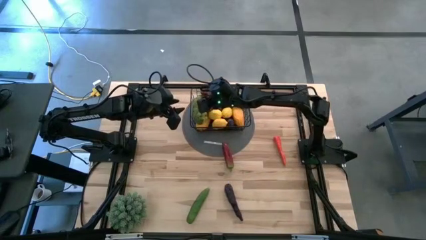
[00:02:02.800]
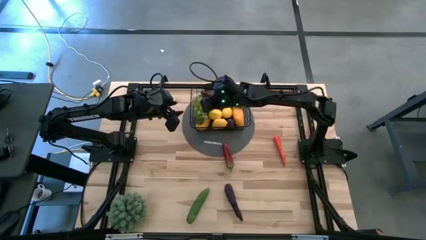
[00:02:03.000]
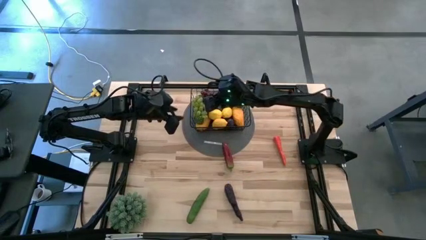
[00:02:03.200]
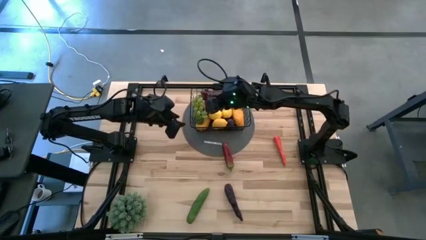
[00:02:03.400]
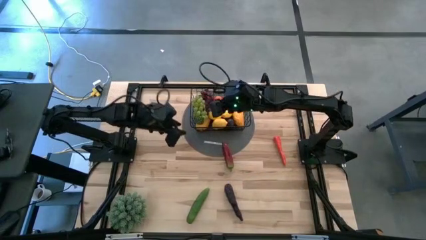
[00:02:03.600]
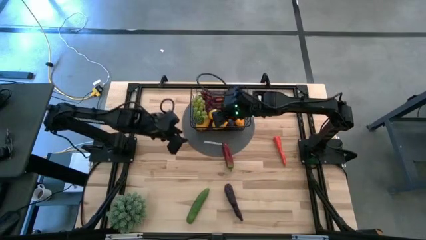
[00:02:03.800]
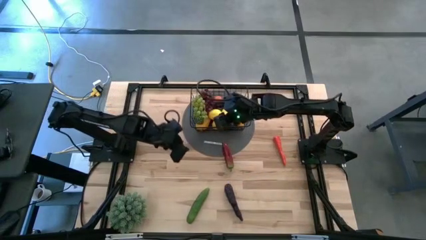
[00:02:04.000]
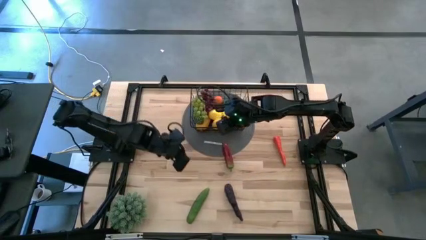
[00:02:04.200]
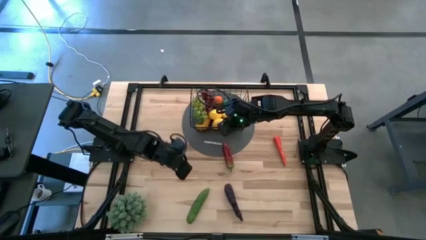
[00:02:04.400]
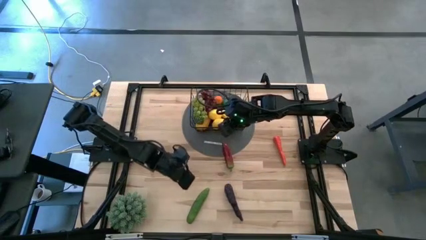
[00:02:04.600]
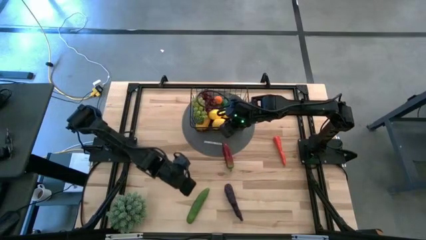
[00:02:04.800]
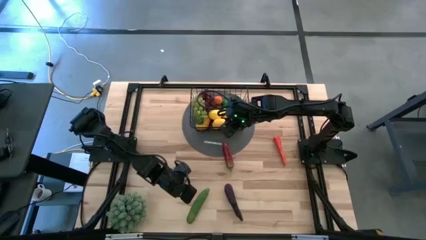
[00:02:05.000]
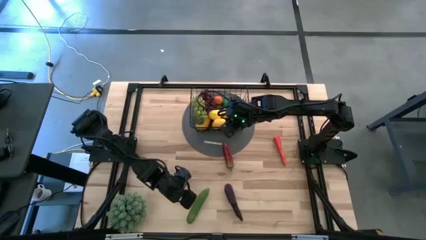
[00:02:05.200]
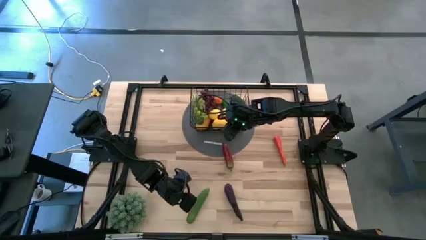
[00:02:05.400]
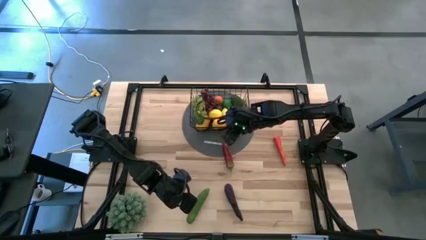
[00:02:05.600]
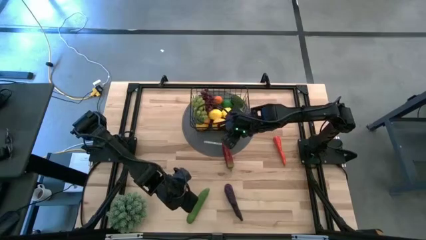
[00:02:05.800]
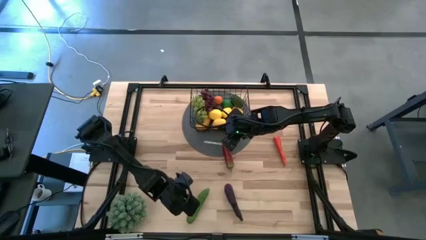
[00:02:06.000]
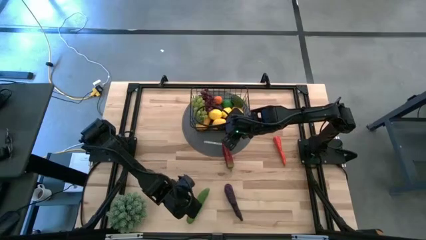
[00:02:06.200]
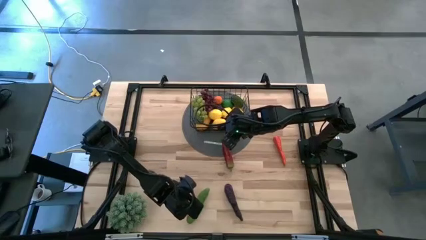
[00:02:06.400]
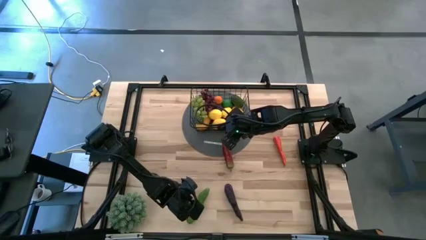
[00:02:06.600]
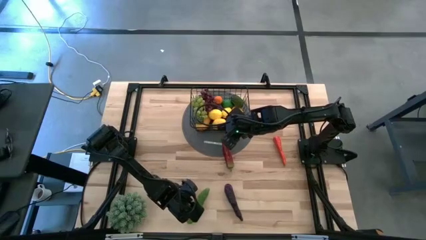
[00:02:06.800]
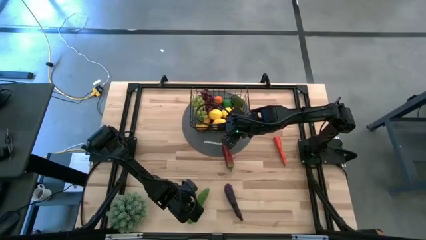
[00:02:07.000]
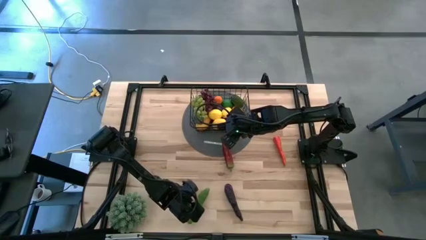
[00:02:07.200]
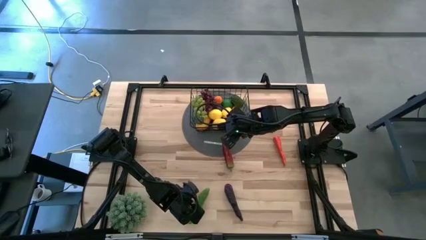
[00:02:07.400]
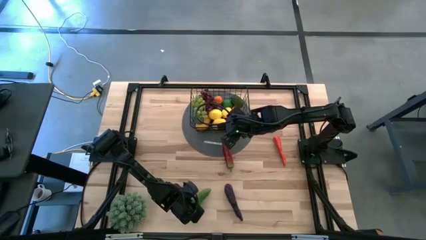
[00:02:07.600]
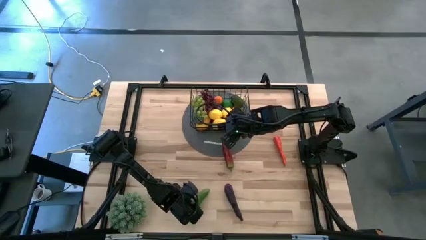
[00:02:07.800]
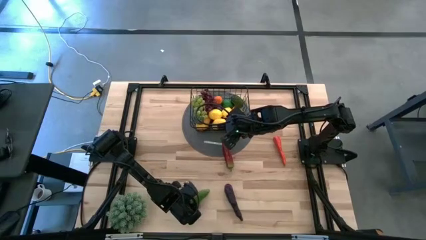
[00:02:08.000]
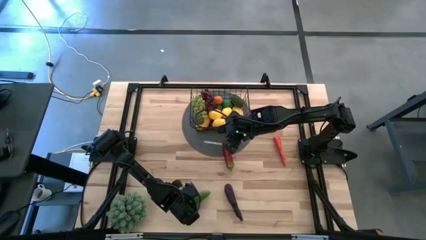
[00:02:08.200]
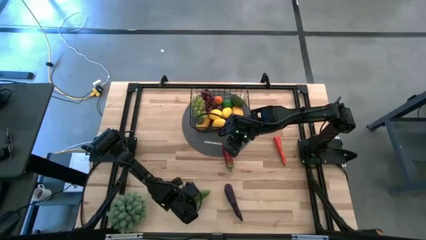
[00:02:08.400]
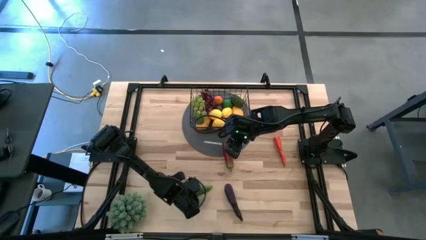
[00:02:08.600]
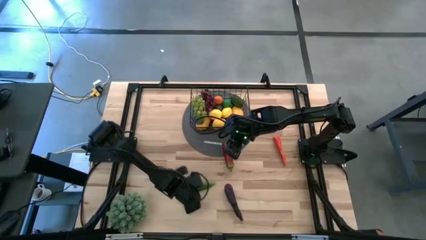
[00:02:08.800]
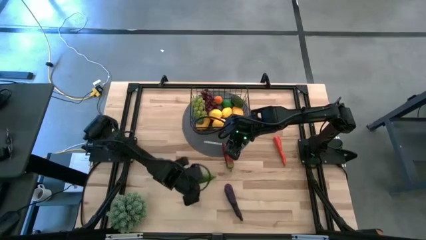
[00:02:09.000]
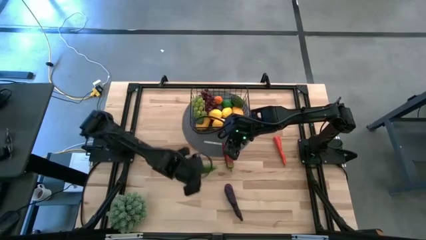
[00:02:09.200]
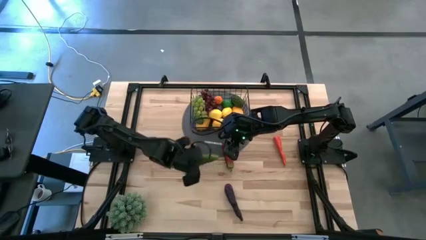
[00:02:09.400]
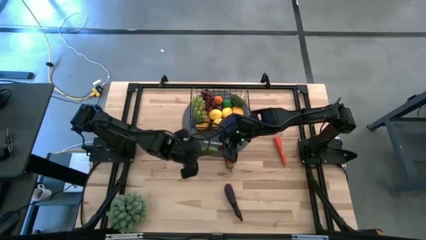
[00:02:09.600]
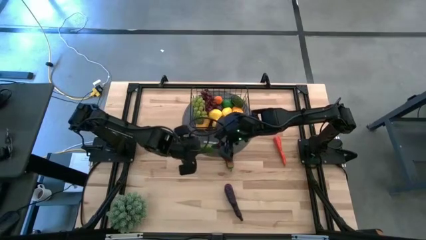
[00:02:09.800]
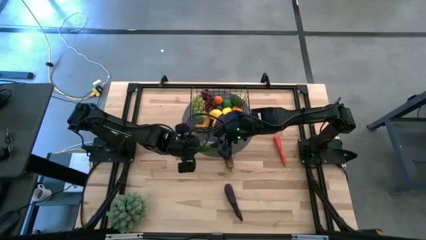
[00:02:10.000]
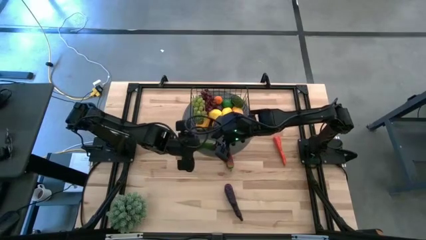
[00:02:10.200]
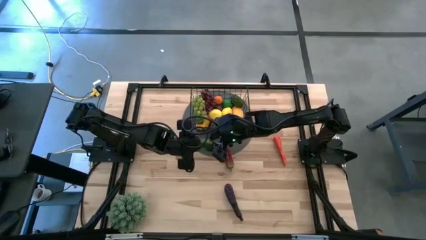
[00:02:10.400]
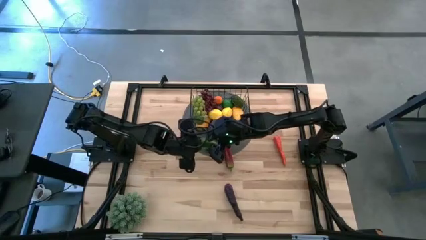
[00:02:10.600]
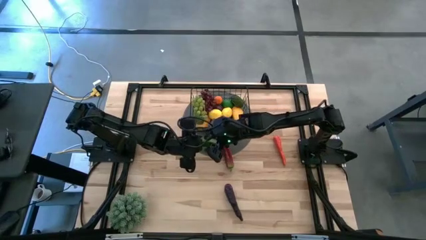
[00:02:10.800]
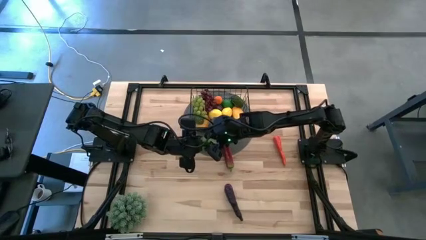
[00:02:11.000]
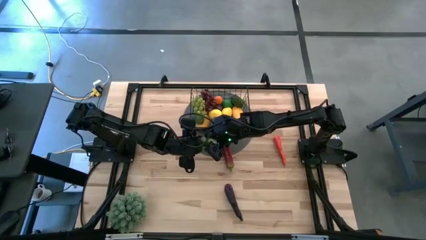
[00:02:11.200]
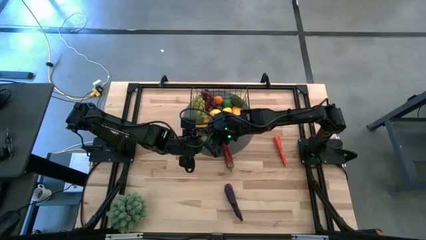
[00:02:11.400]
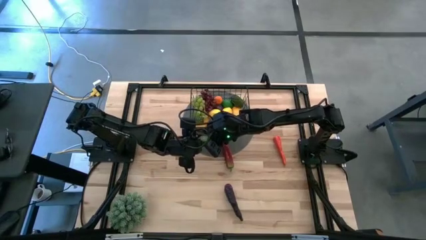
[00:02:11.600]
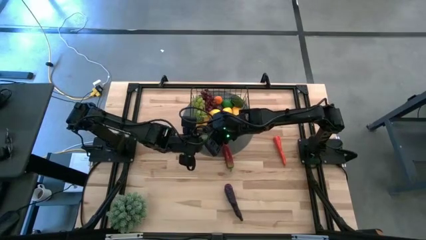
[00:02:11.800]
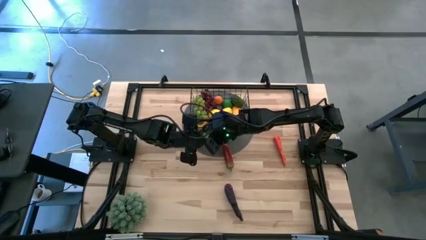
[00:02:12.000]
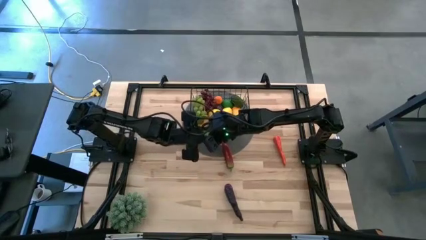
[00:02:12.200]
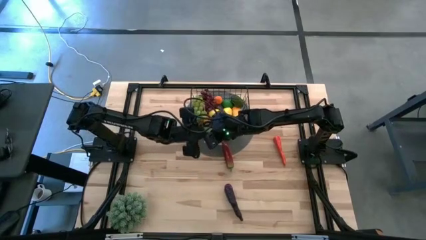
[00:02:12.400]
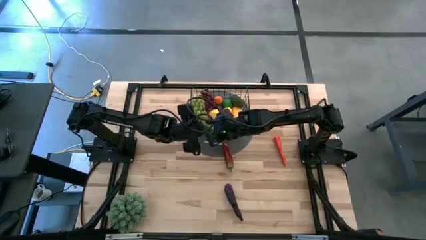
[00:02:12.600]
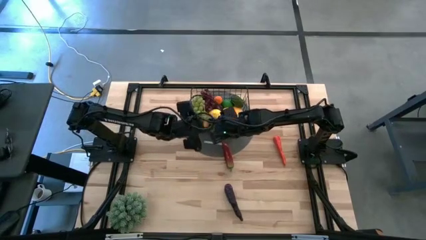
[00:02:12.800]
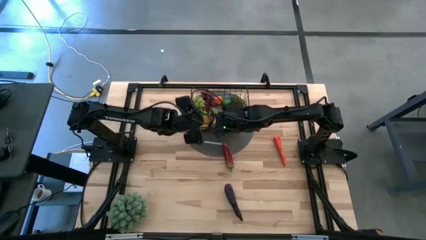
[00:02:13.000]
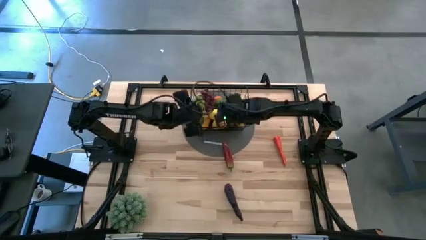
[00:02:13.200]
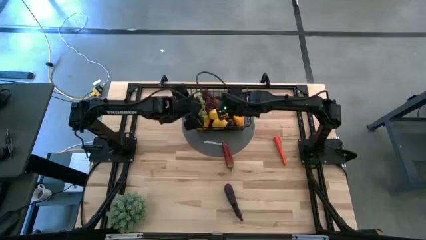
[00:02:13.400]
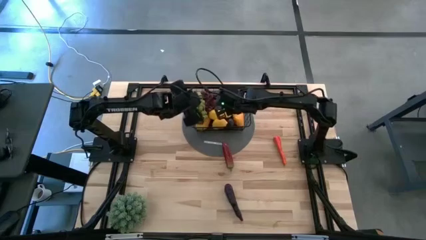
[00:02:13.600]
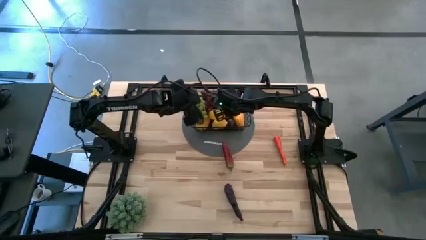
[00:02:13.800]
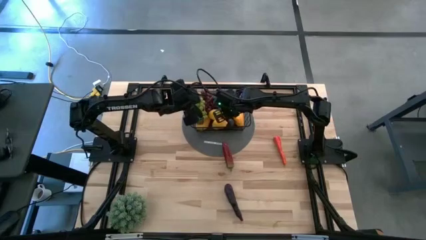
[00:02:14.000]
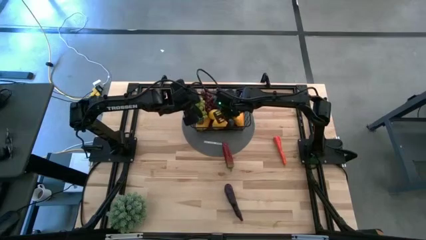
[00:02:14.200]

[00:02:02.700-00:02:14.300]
Task: Build produce basket
Put the green cucumber into the black wire basket

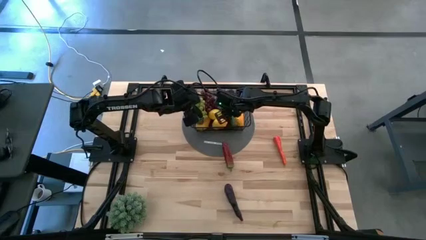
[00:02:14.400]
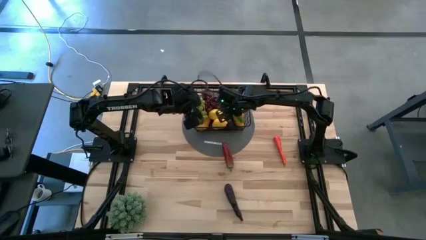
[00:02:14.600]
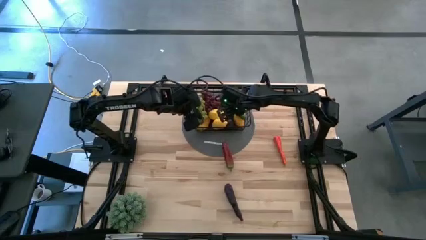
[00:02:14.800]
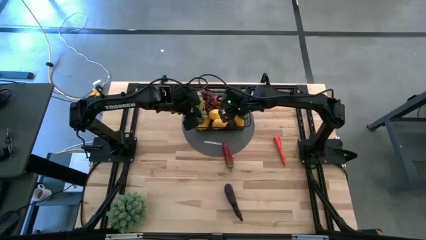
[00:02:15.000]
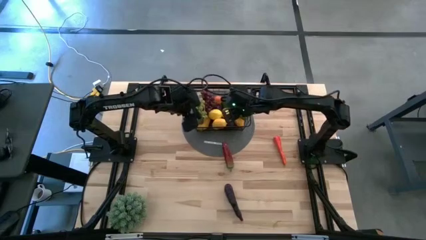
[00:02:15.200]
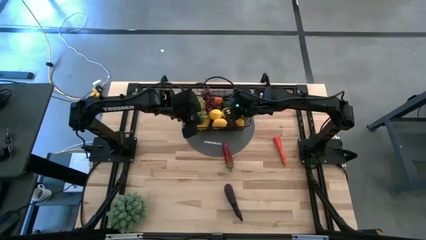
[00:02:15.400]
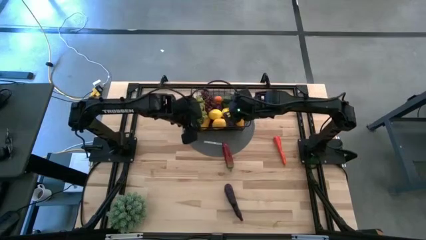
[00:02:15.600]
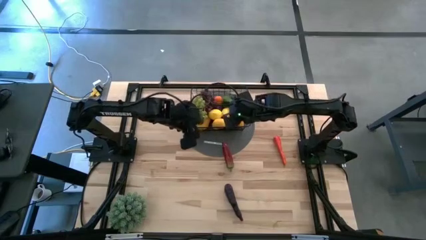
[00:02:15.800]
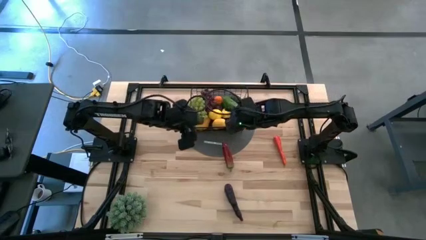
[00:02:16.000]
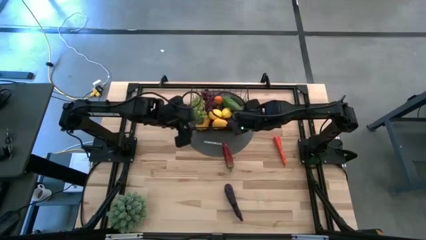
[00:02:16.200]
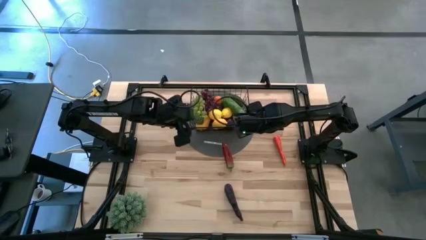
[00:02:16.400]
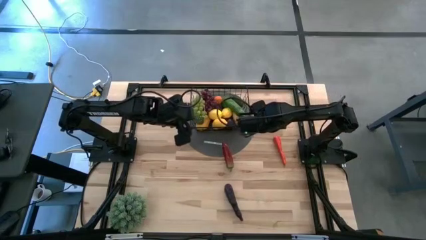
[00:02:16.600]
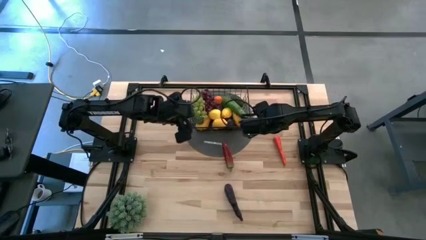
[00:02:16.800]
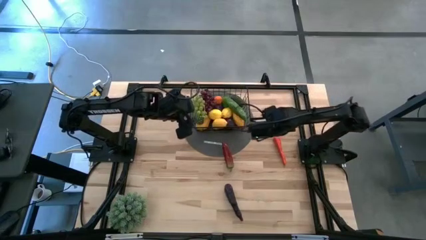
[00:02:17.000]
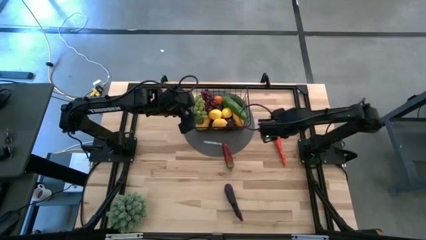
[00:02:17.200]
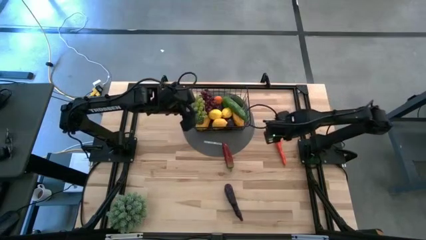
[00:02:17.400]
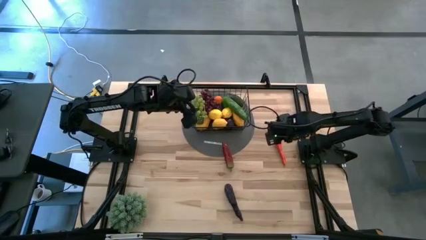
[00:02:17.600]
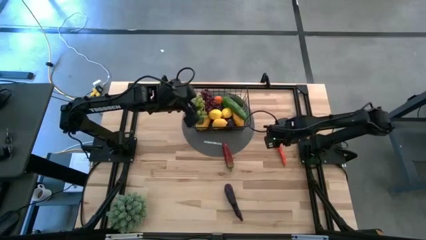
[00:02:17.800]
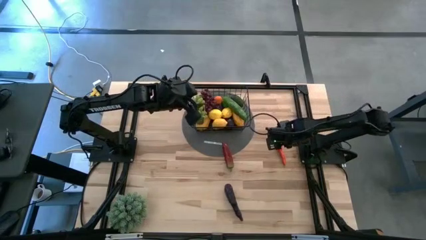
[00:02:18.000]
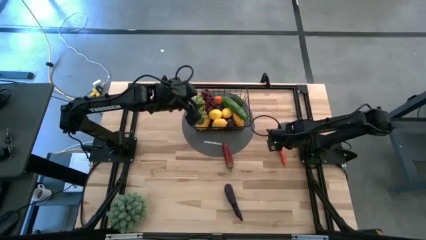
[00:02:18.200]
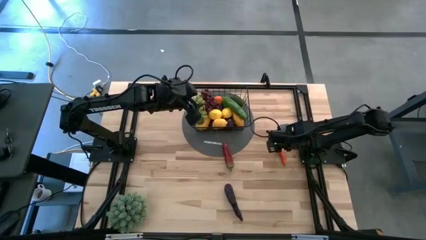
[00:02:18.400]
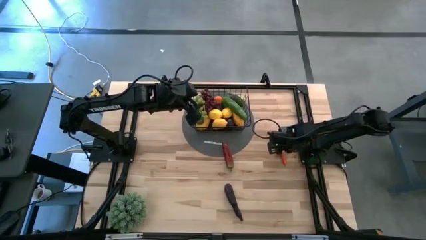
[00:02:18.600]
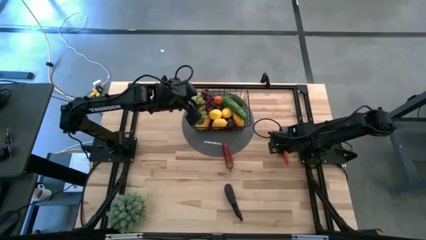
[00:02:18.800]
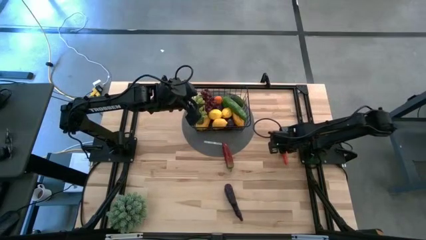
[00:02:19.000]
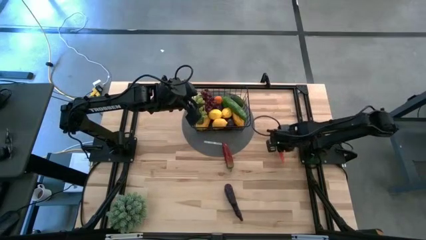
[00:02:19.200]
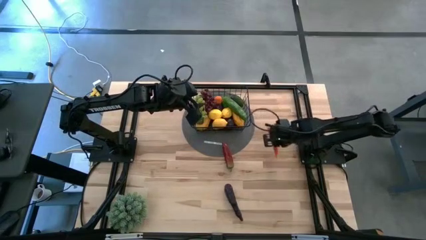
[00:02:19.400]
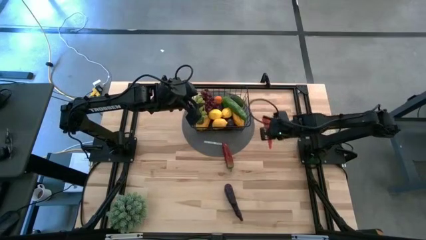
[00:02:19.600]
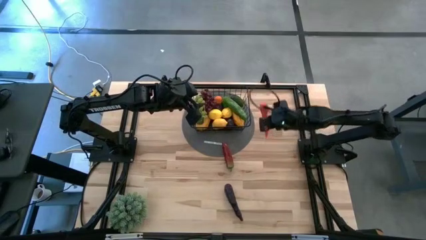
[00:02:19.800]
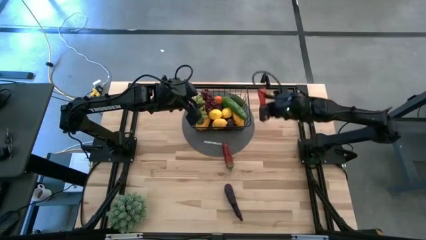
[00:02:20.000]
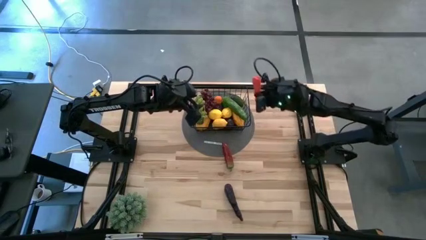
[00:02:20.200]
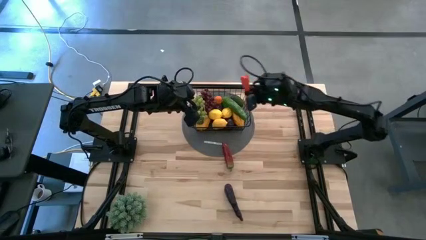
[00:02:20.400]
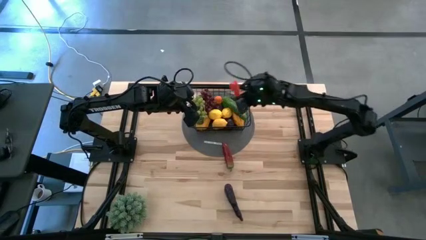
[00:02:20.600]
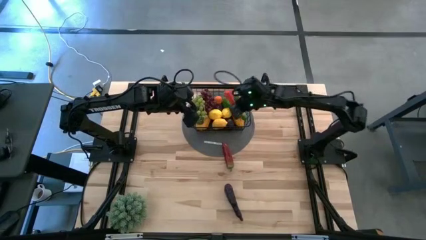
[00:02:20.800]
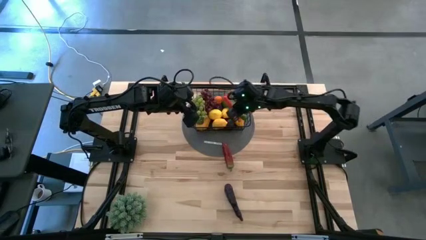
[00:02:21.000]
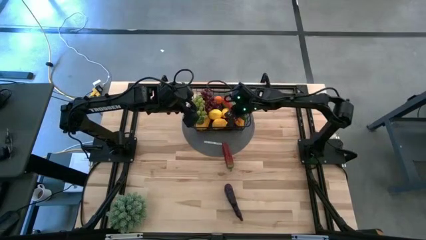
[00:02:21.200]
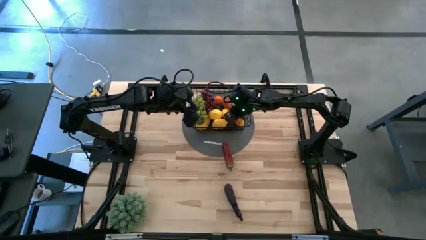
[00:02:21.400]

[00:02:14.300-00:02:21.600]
Put the orange carrot into the black wire basket
